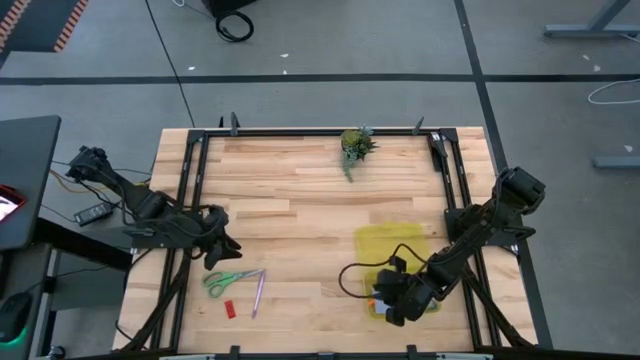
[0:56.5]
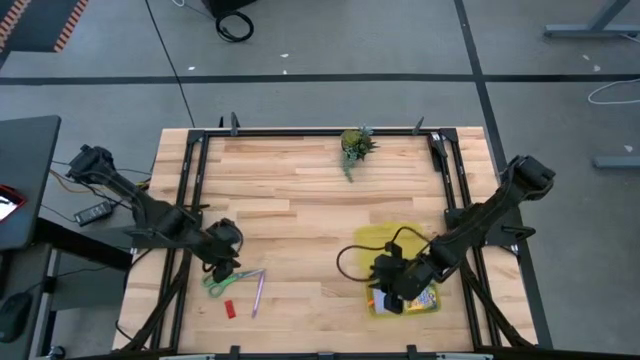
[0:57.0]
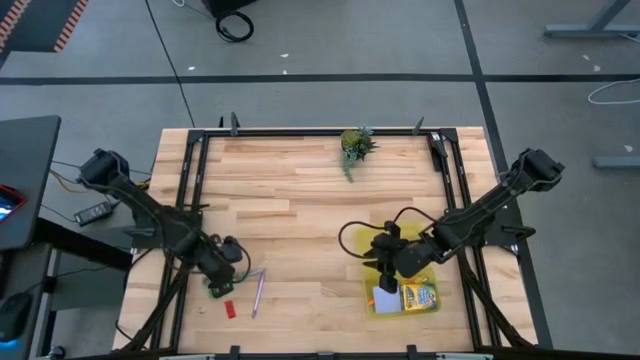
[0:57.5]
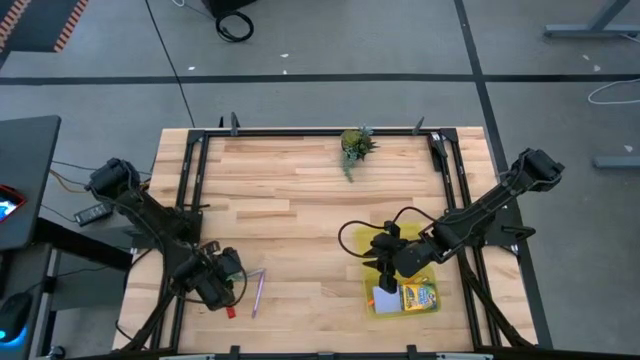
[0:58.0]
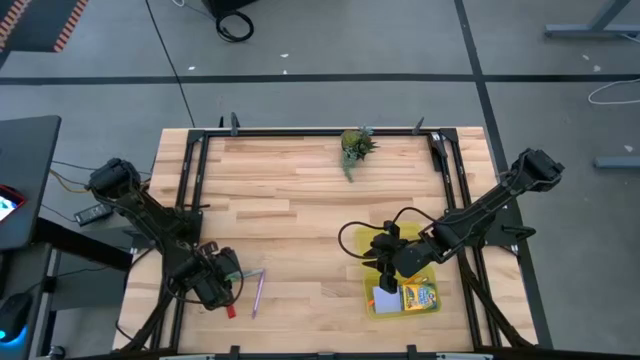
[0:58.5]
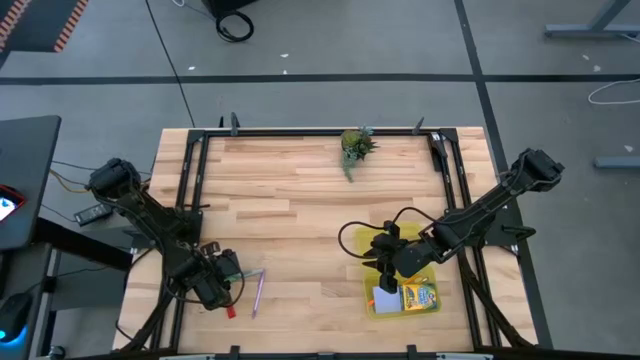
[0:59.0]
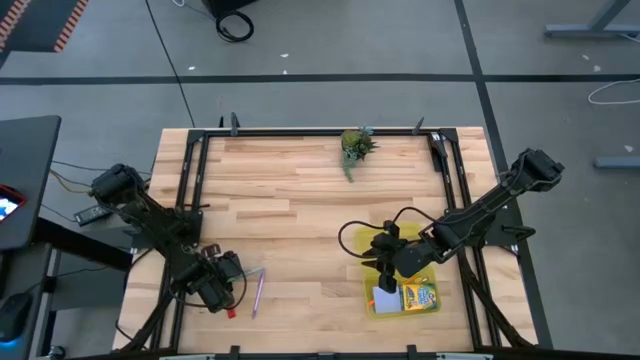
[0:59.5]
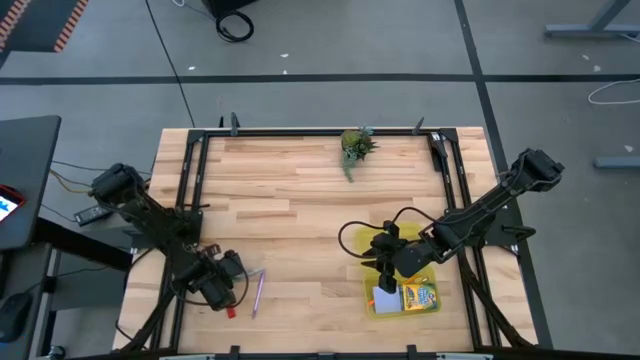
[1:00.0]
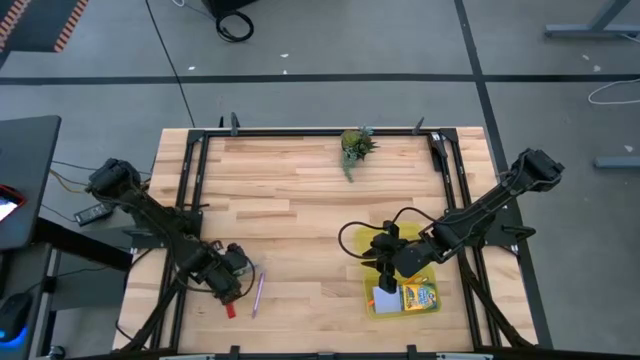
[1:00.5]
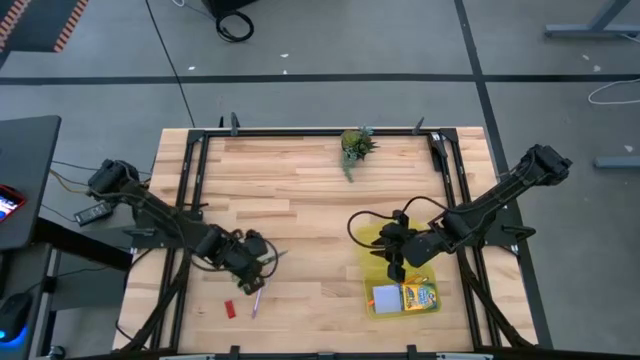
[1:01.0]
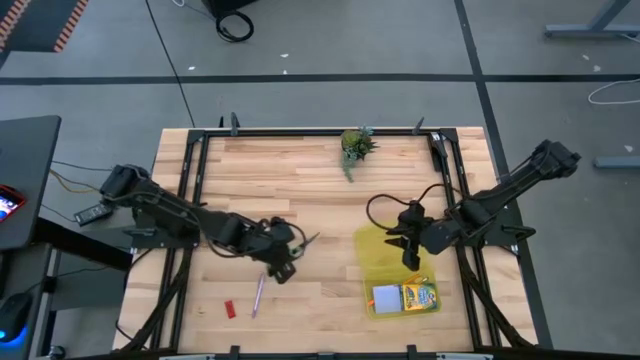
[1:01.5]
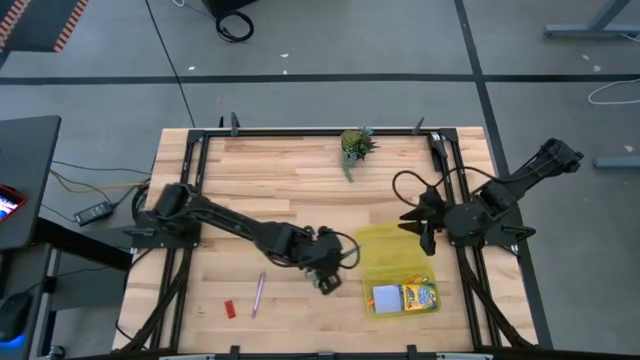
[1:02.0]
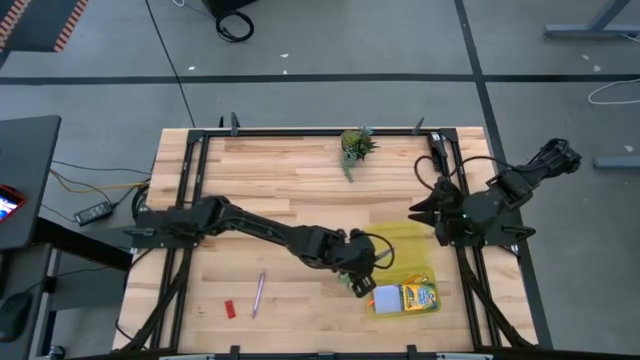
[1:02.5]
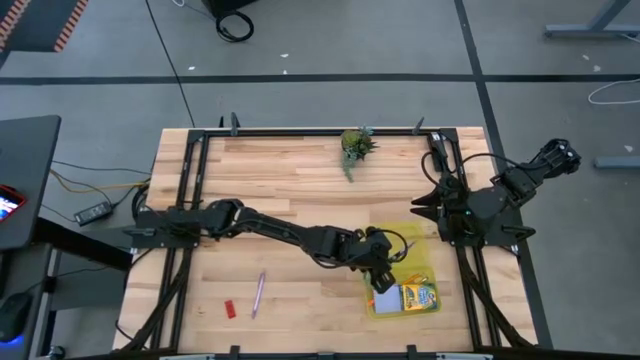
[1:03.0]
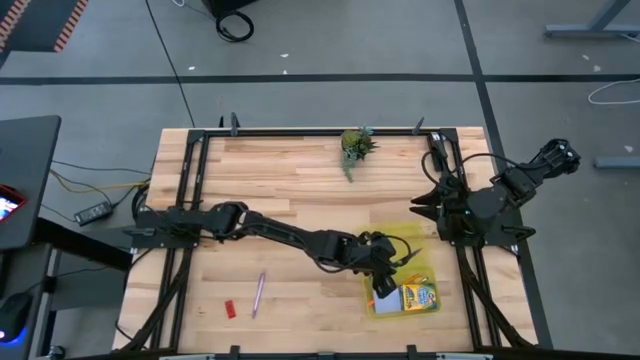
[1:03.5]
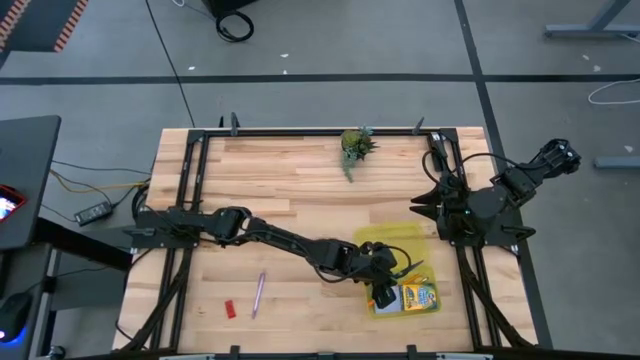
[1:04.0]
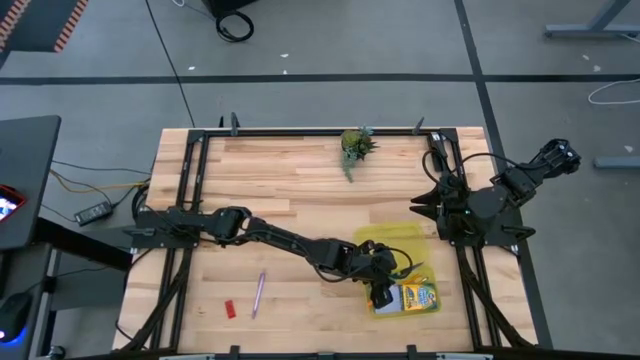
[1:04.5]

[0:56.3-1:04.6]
Task: Pack school essentials
Put the green scissors into the yellow supply box

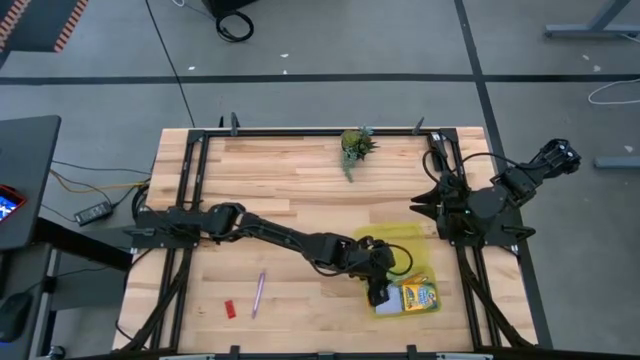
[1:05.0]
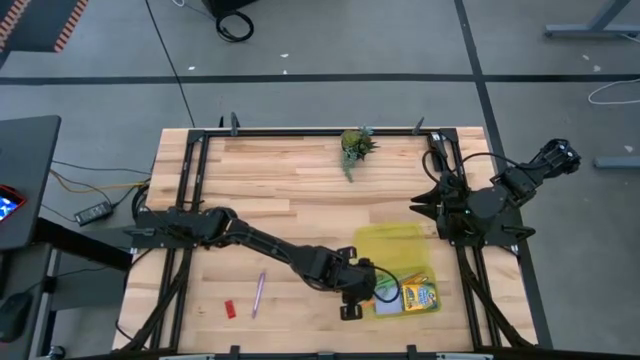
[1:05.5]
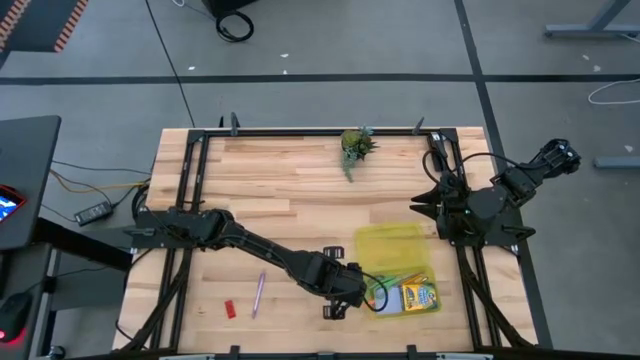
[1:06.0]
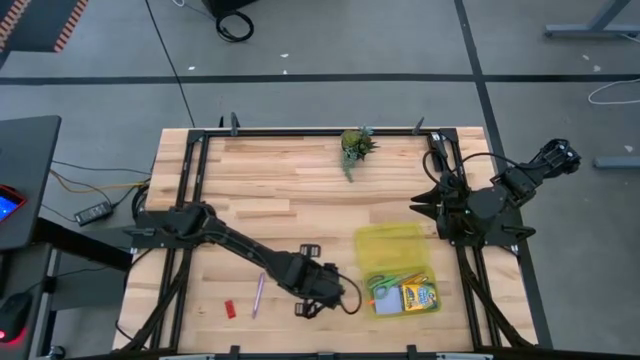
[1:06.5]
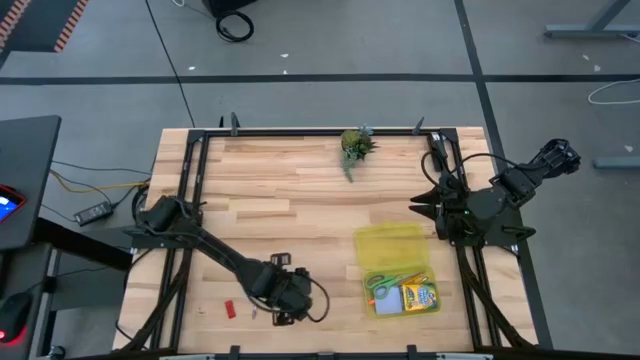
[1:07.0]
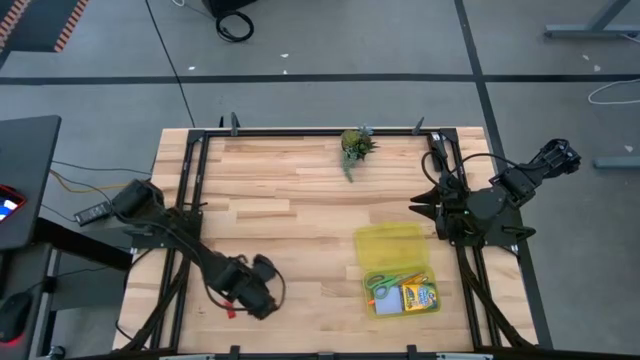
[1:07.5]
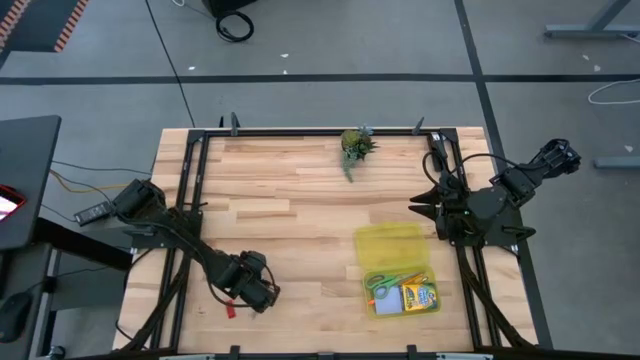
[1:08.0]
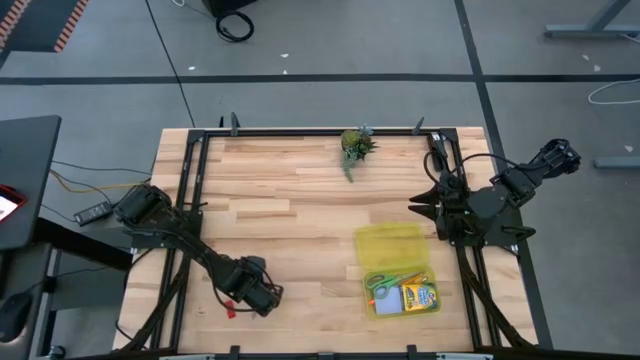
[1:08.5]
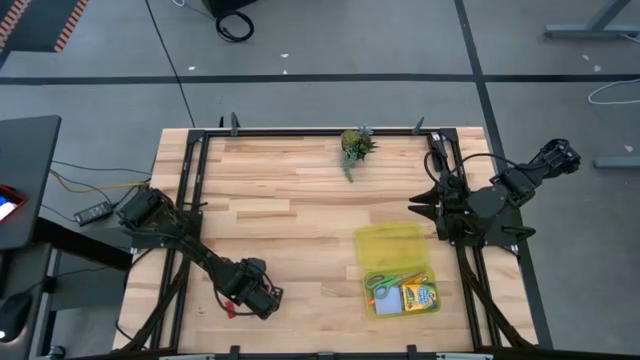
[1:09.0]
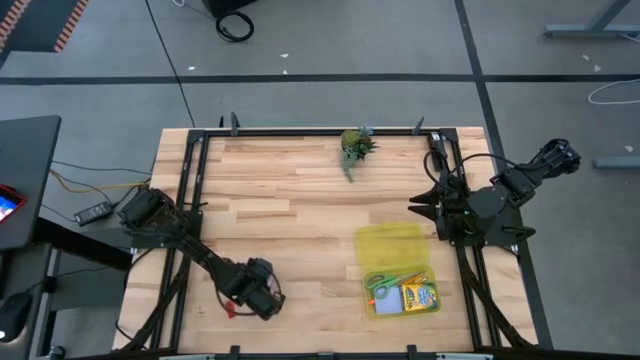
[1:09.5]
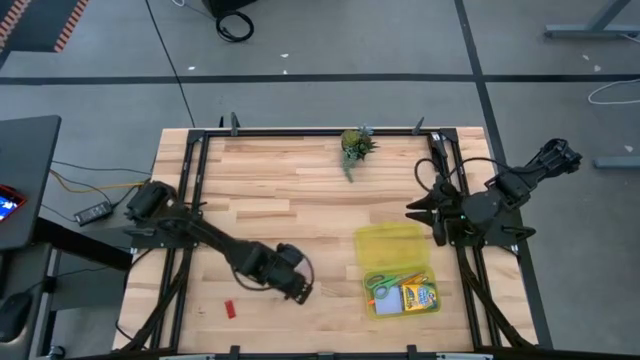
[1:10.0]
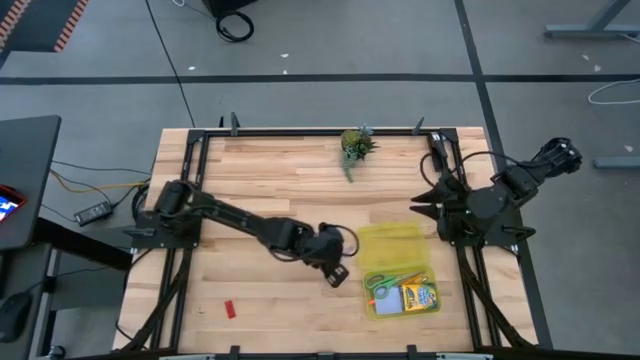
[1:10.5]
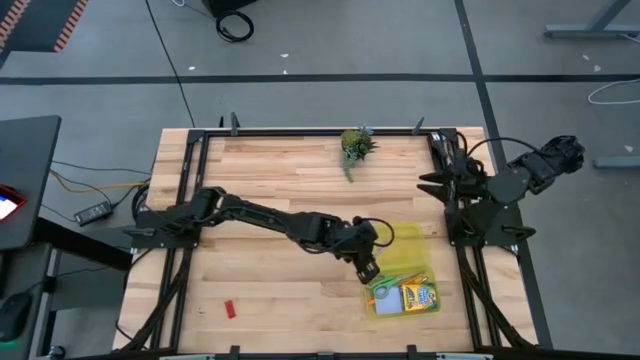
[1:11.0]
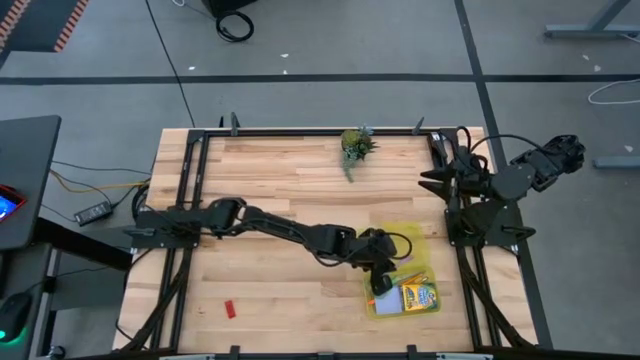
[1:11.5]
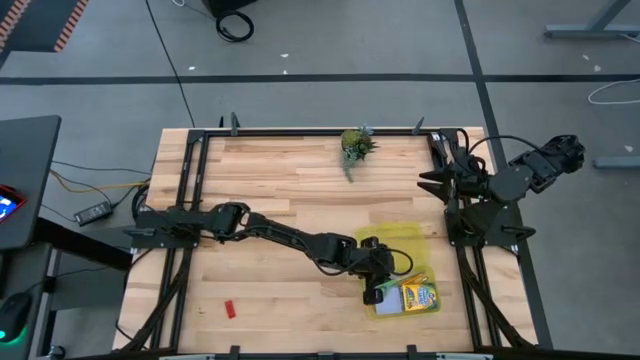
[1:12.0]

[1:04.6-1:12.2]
Put the purple pen into the yellow supply box

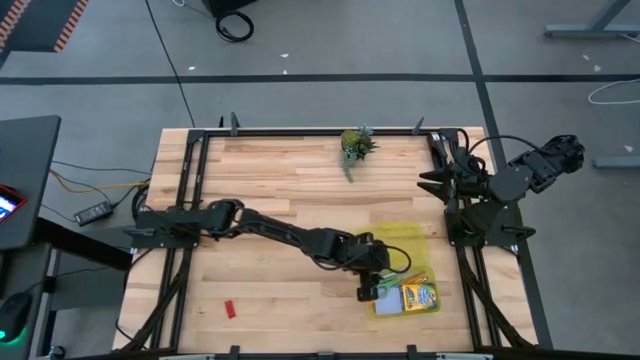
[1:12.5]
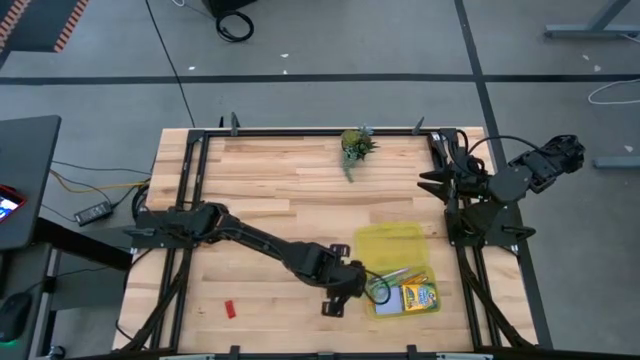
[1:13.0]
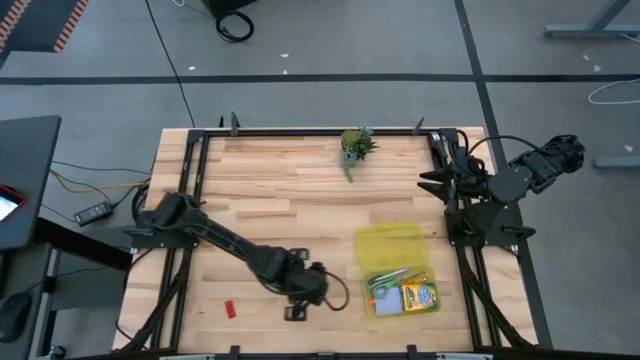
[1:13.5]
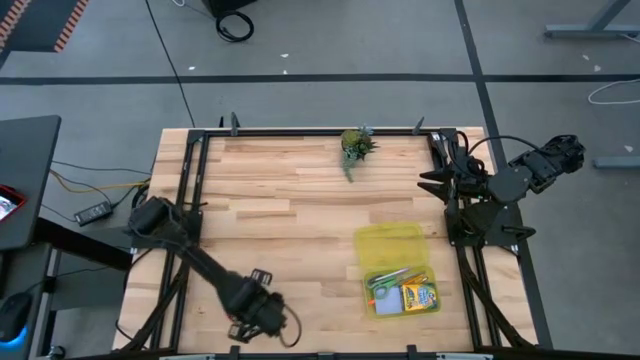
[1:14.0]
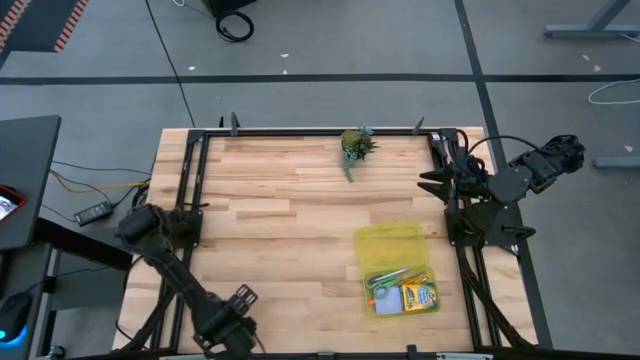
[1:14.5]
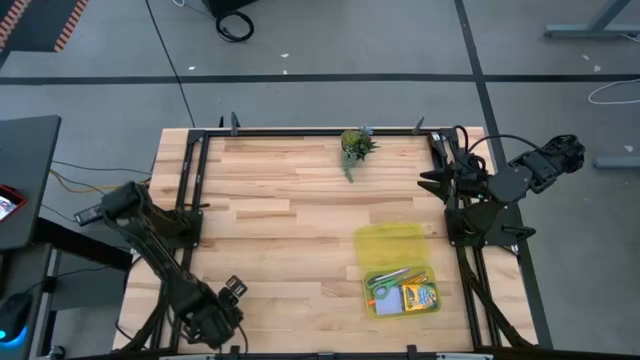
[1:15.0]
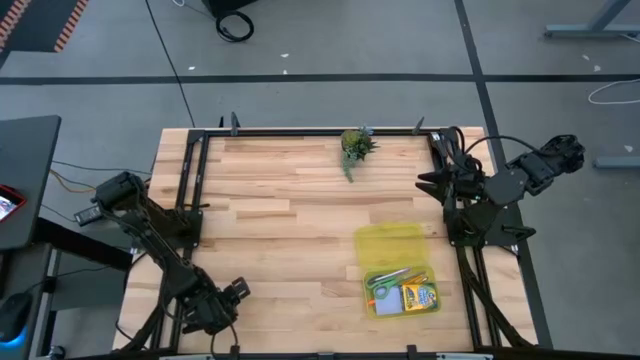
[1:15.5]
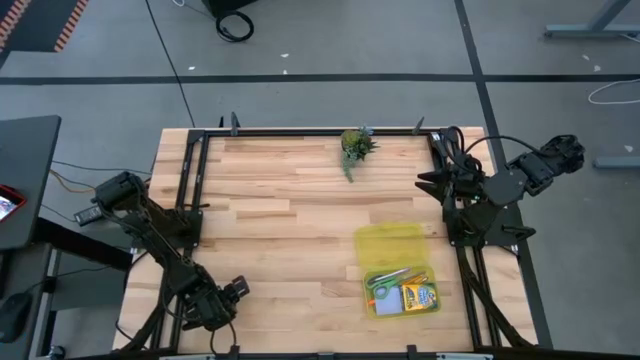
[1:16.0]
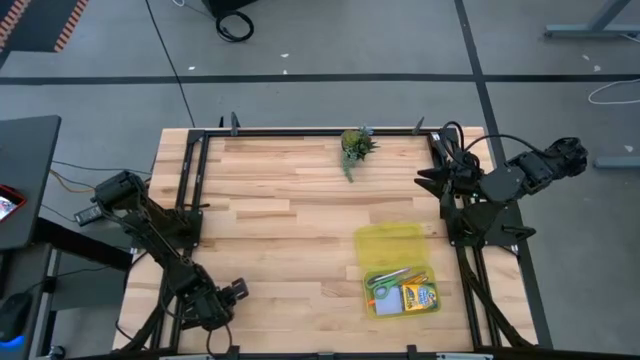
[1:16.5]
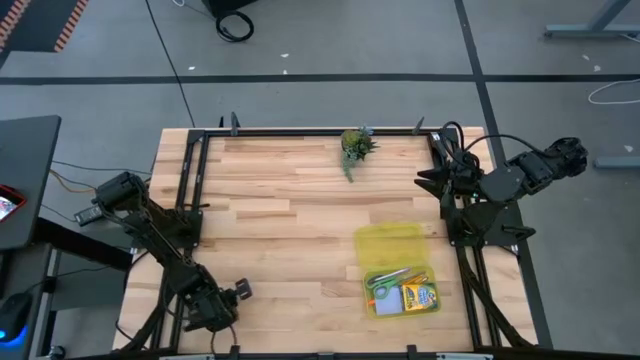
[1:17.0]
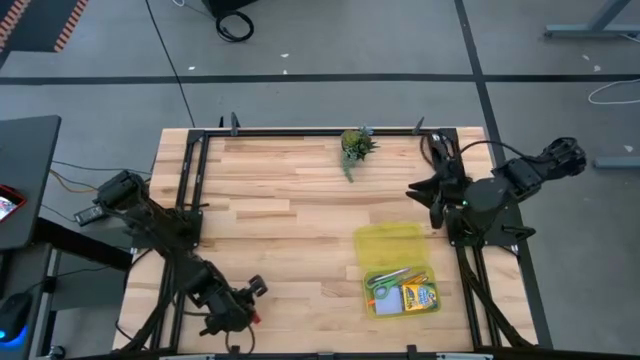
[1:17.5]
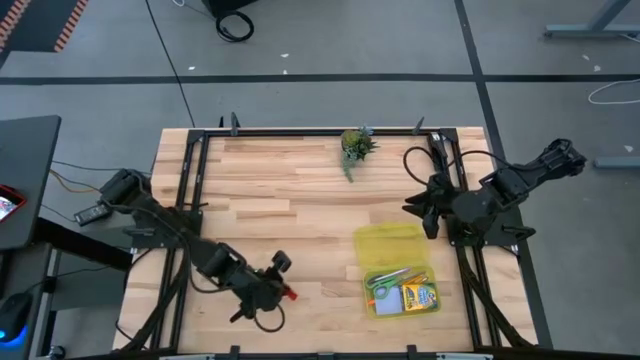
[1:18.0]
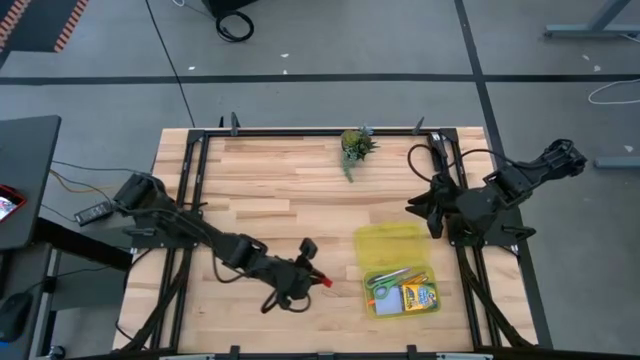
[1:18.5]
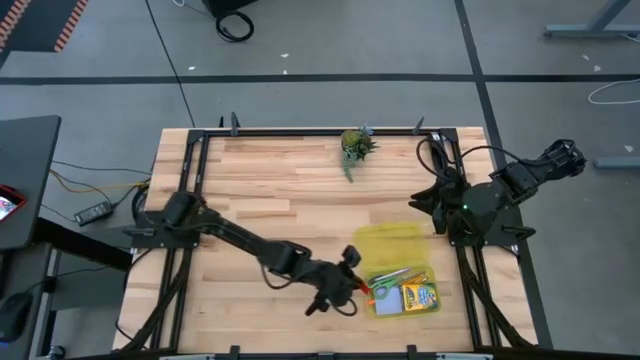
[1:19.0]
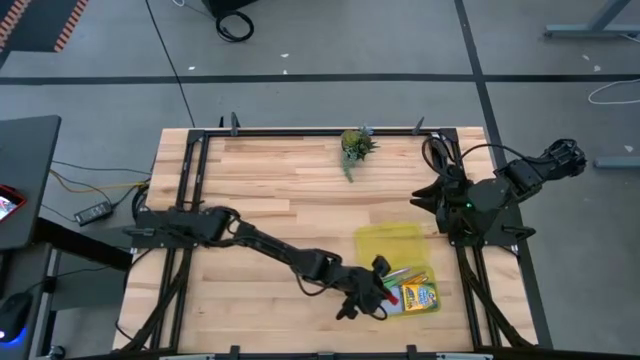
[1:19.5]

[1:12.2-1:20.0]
Put the red eraser into the yellow supply box
